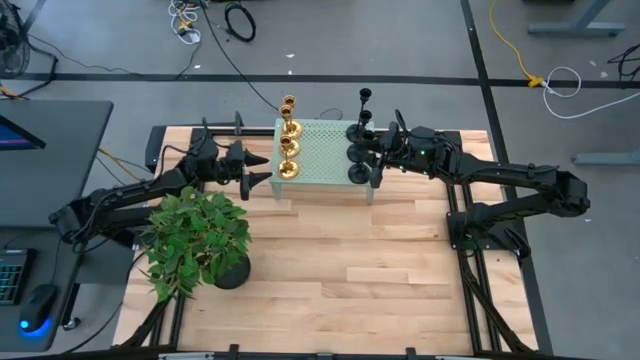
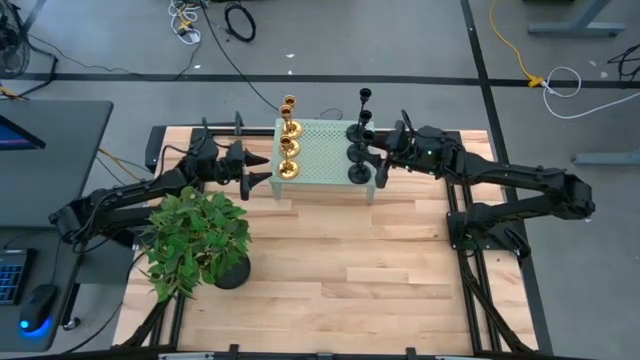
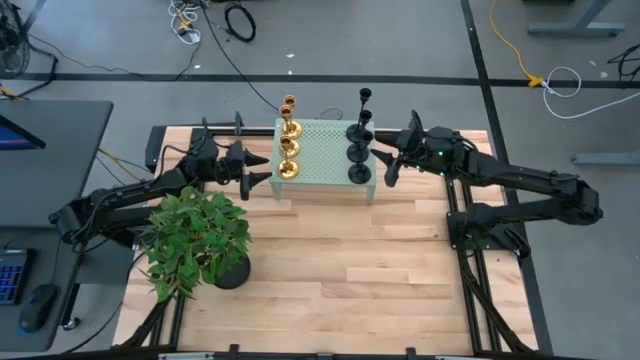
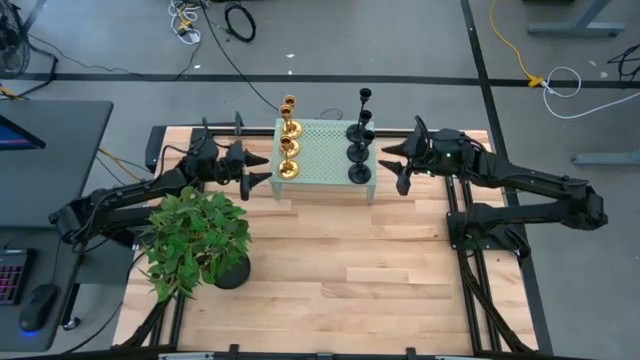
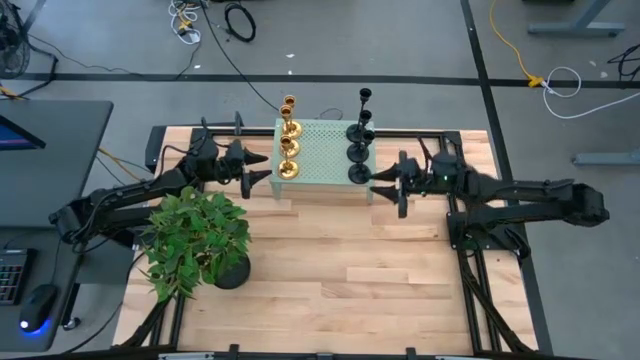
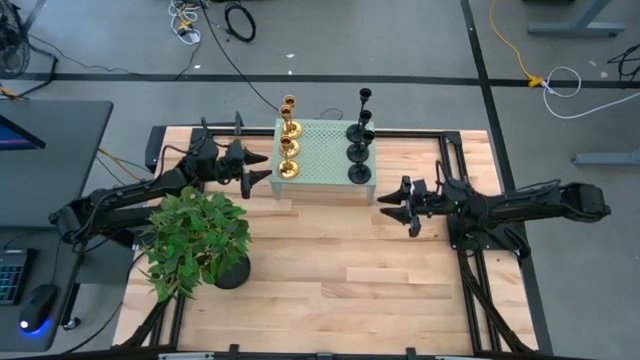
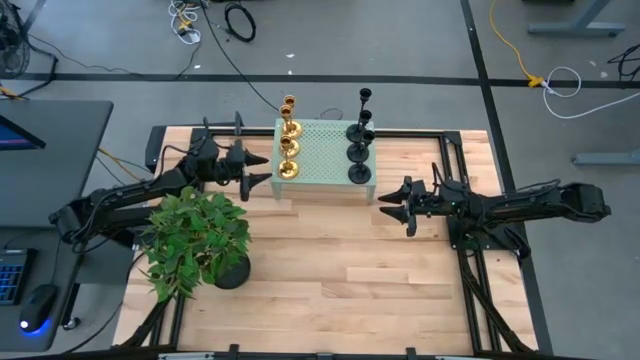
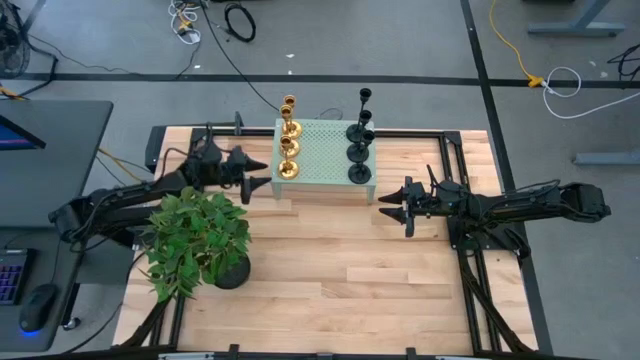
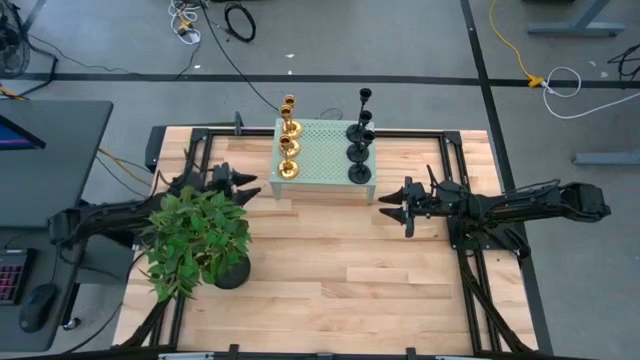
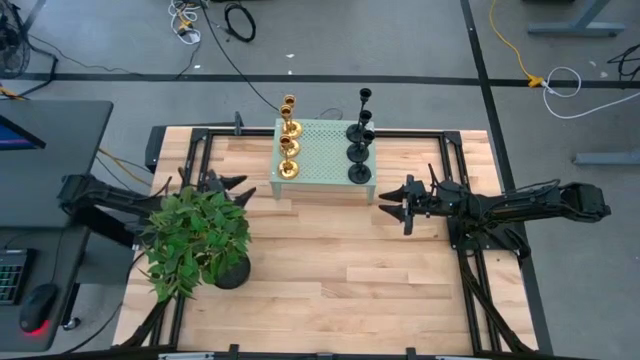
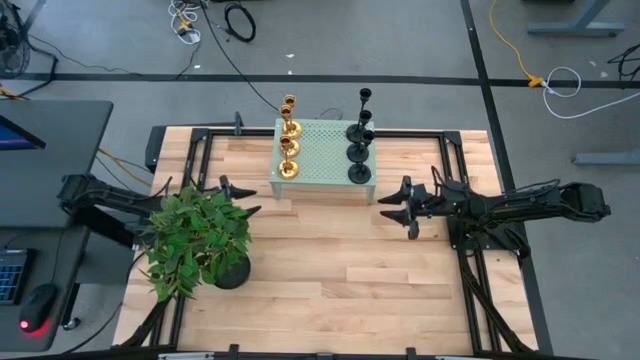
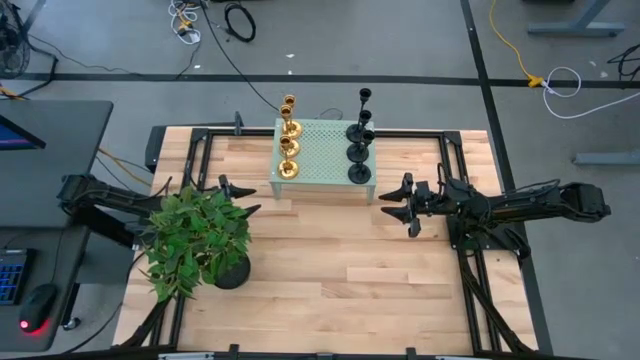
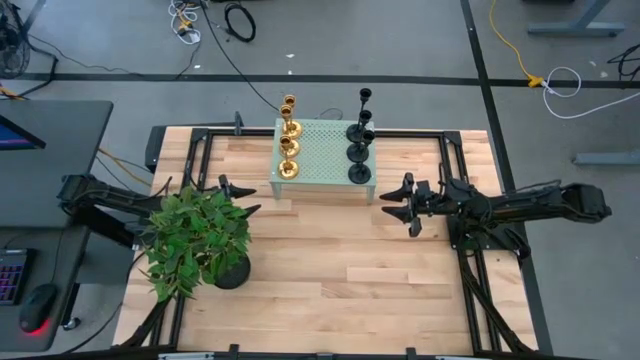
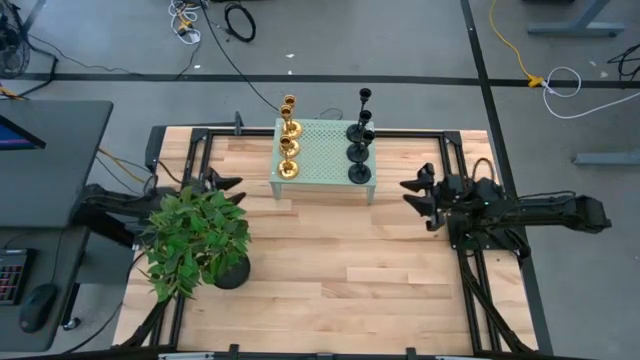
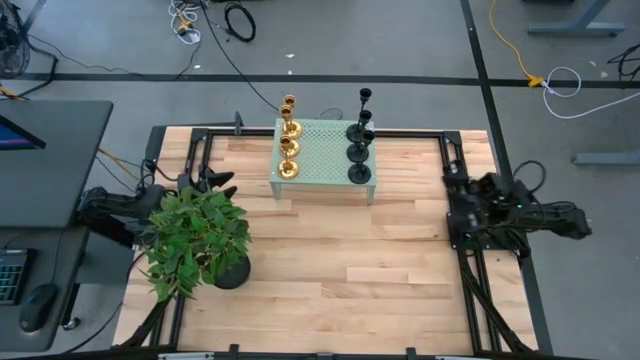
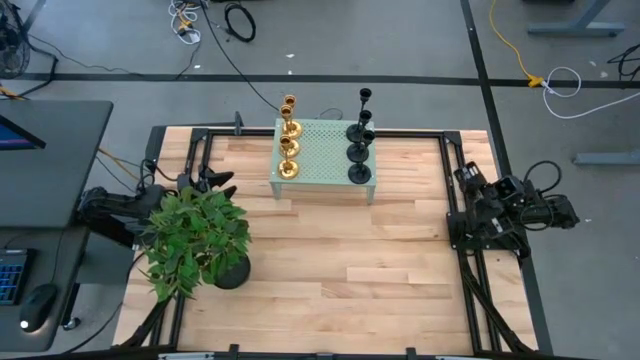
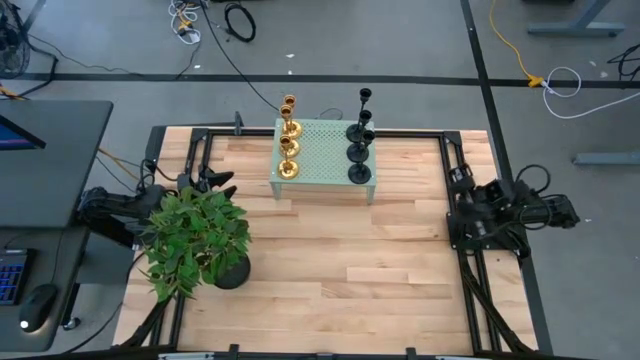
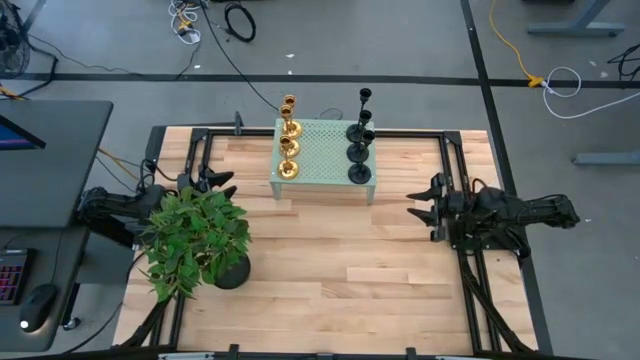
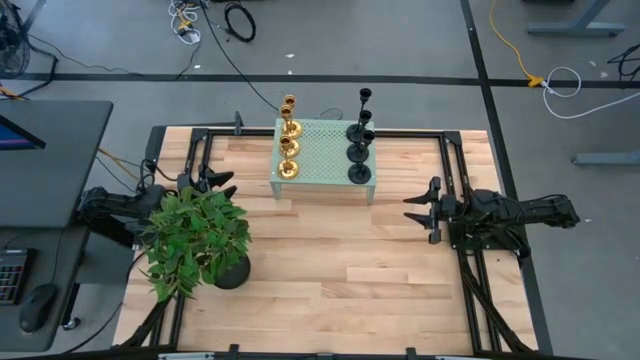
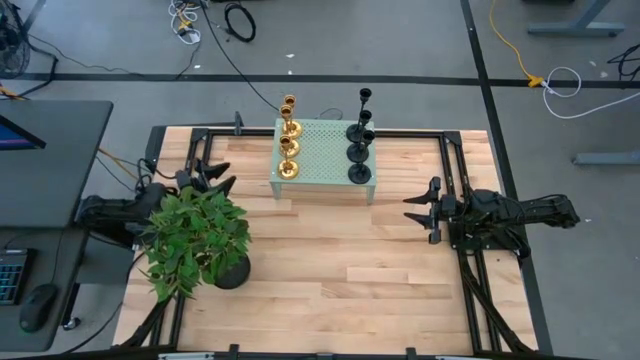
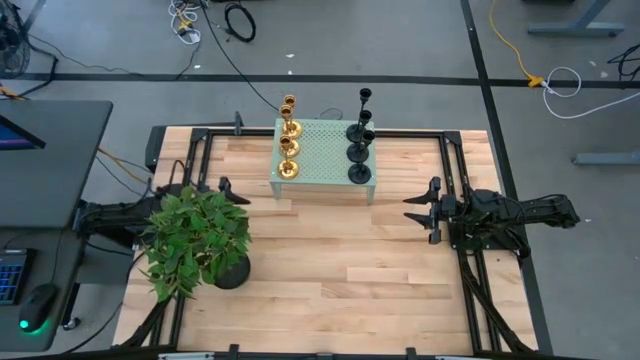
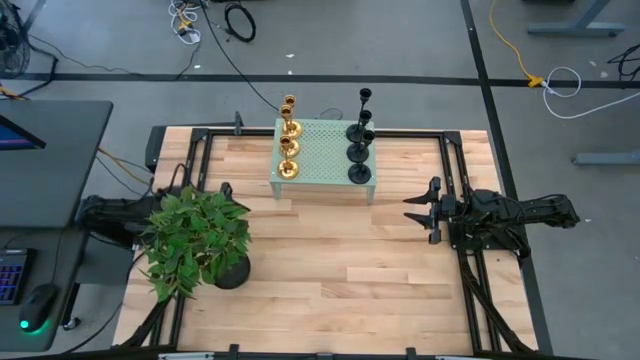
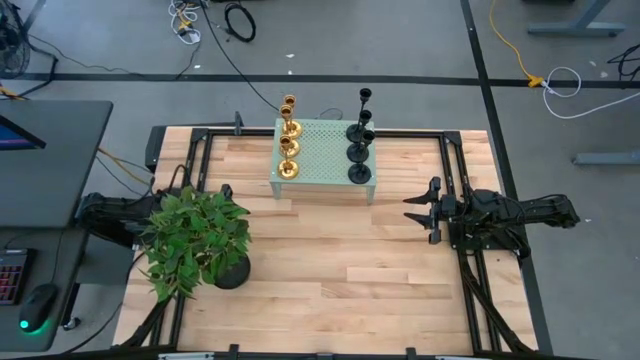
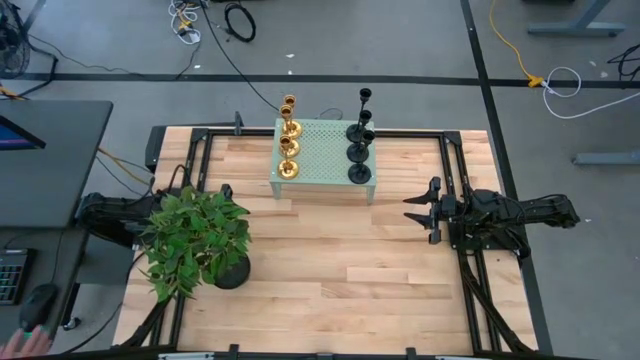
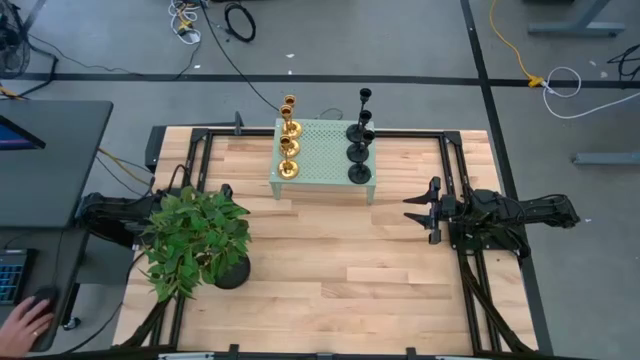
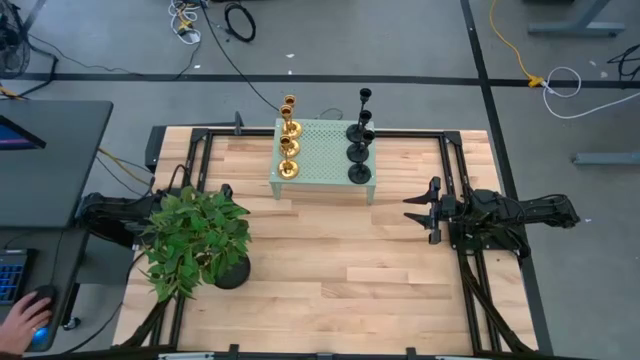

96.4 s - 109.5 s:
Task: Pick & Place candle stick holders
Return to Home Position

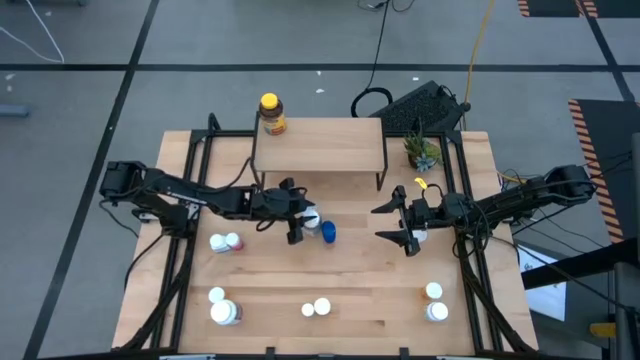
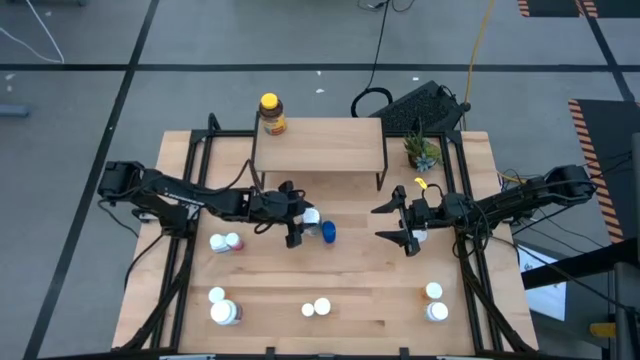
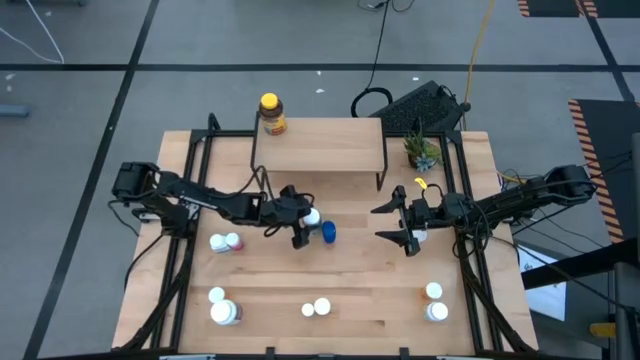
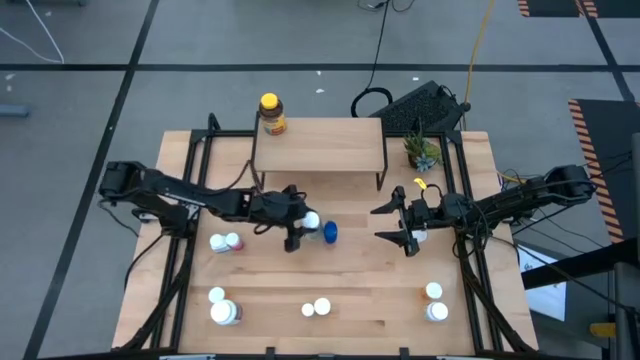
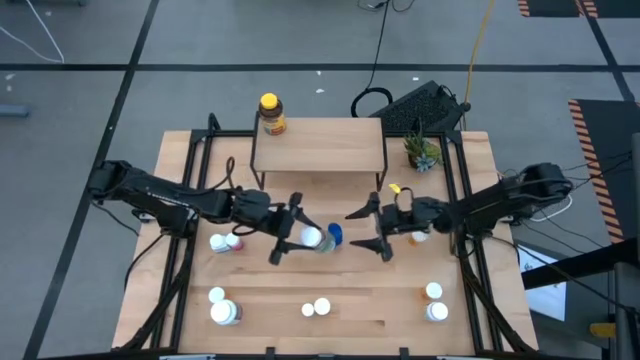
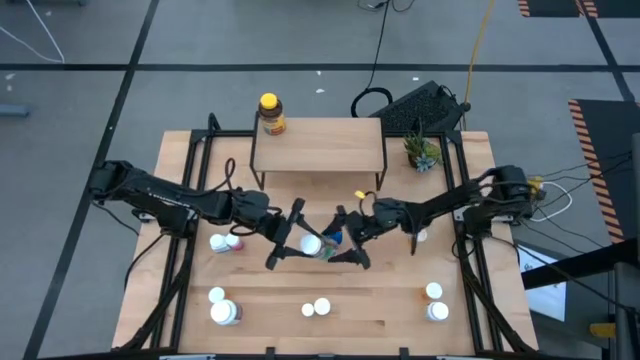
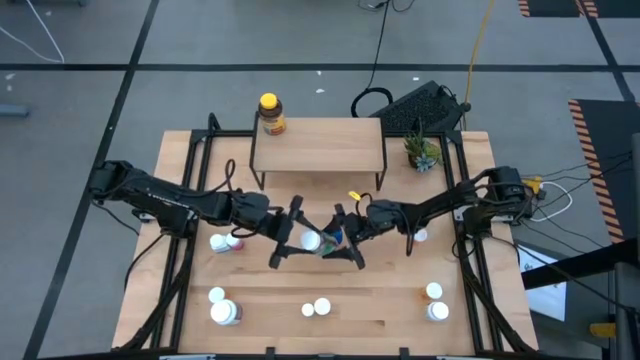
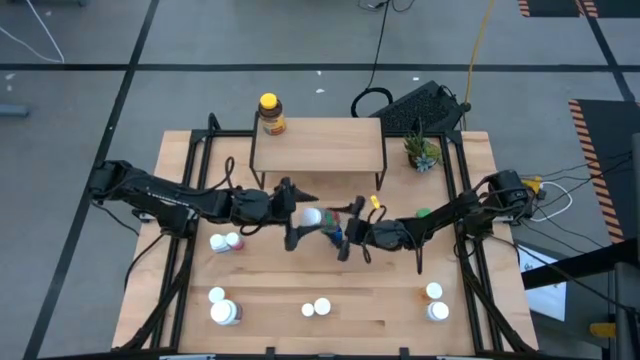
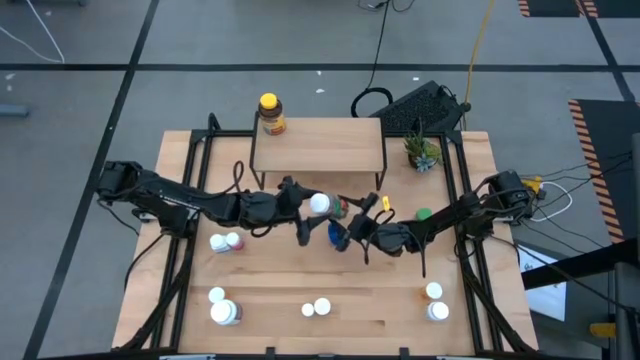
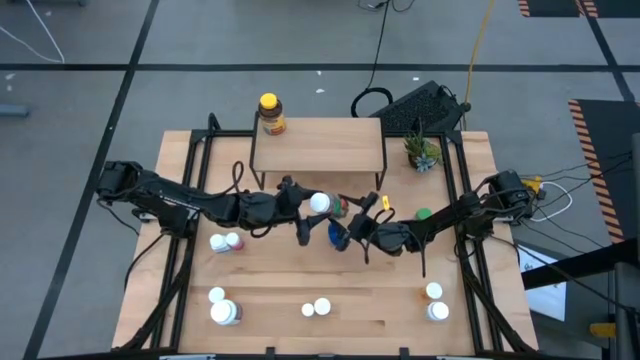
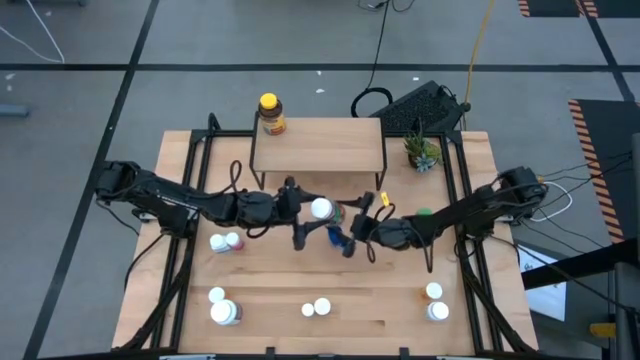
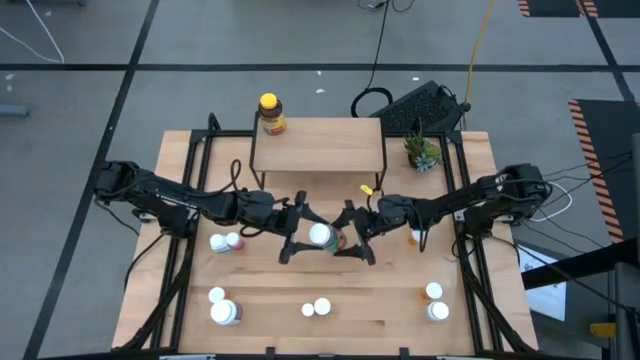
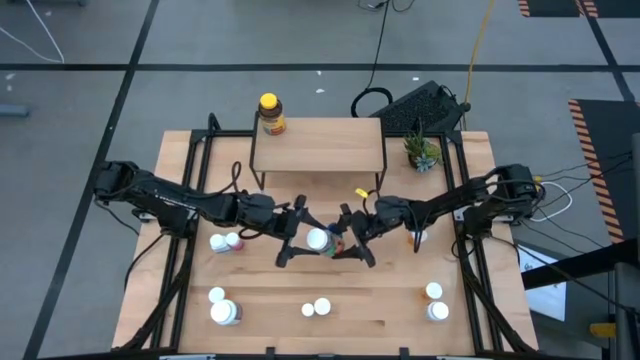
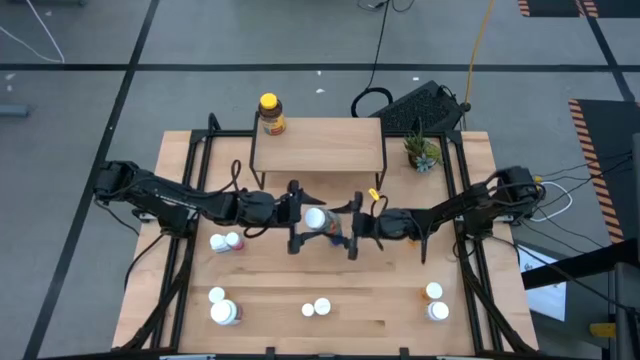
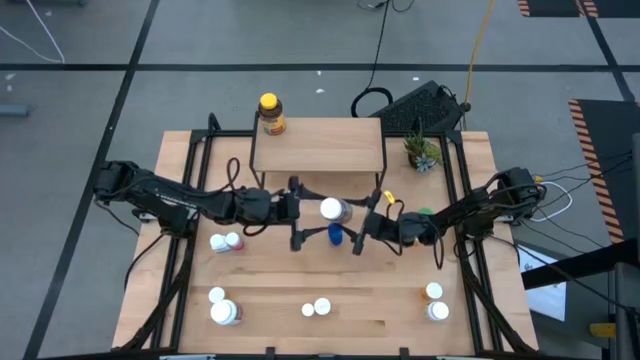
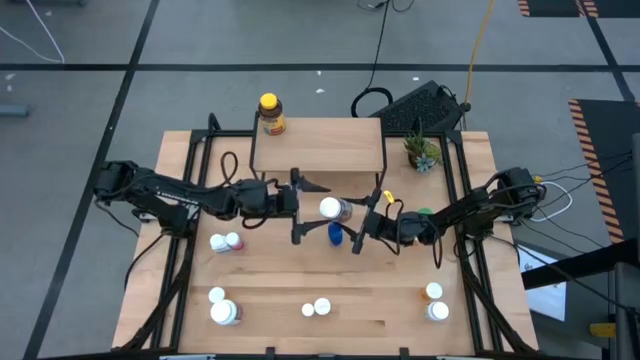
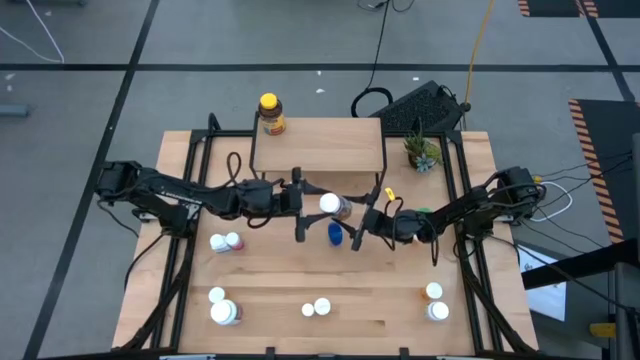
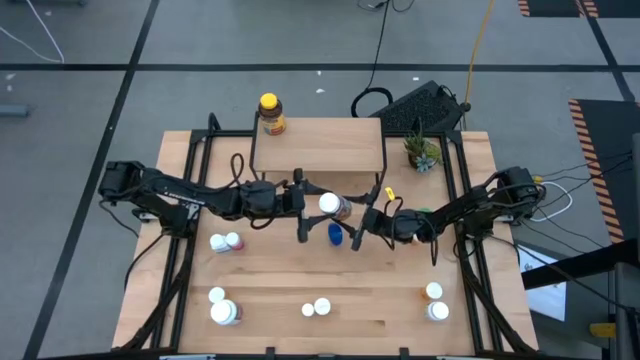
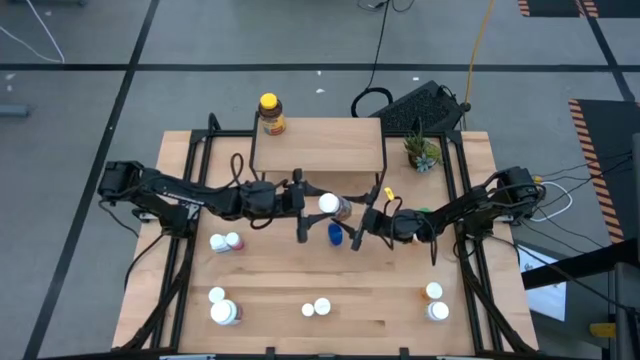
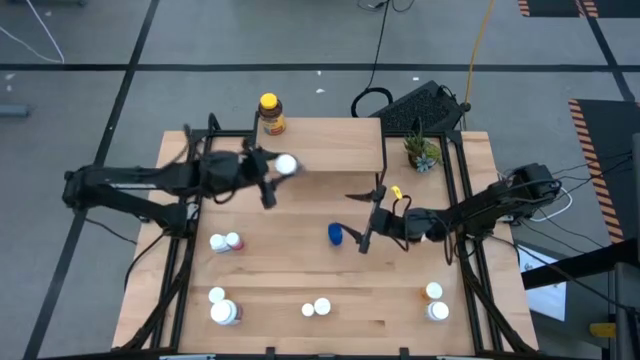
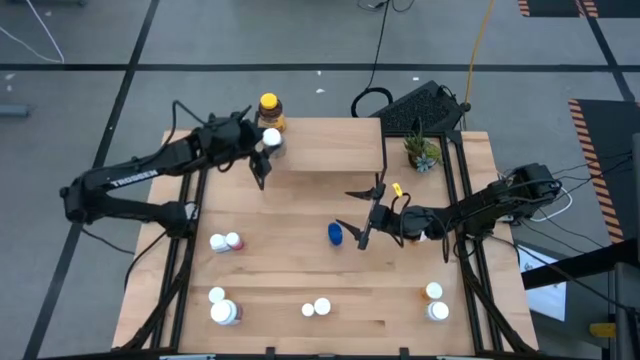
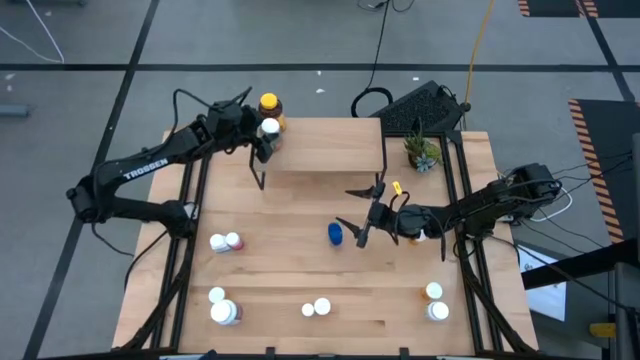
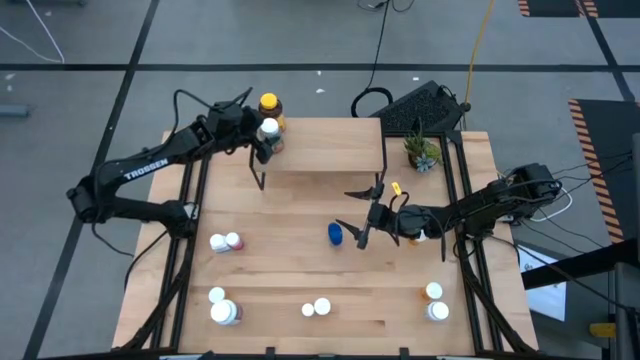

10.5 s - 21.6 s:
Task: Pick and place medicine bottles onto shelf by color
Put the large green medicine bottle on the shelf, aligned with the large yellow medicine bottle
